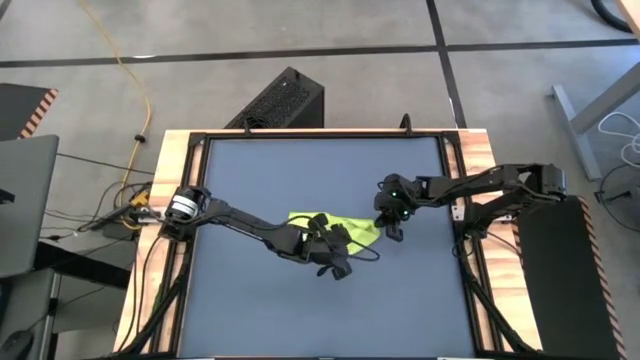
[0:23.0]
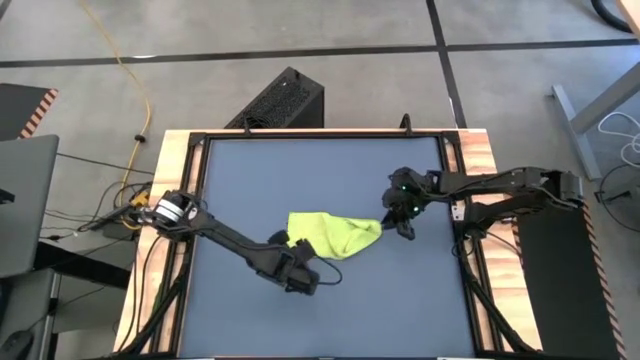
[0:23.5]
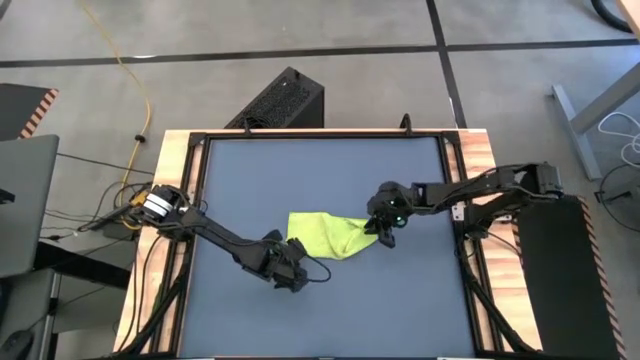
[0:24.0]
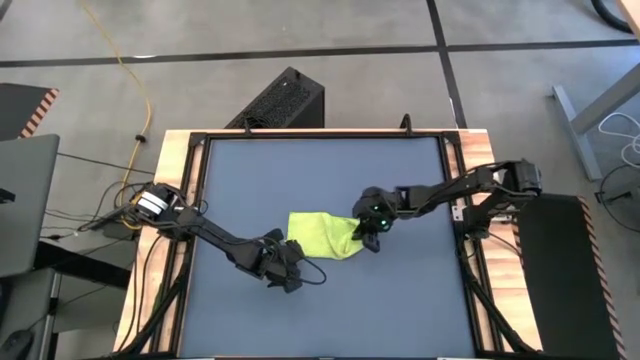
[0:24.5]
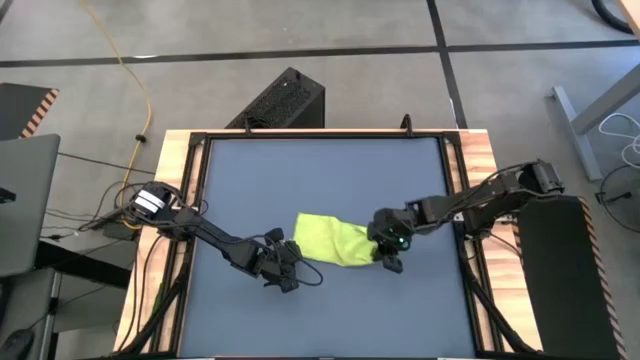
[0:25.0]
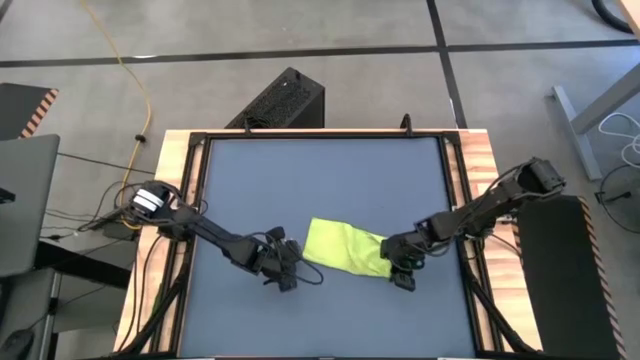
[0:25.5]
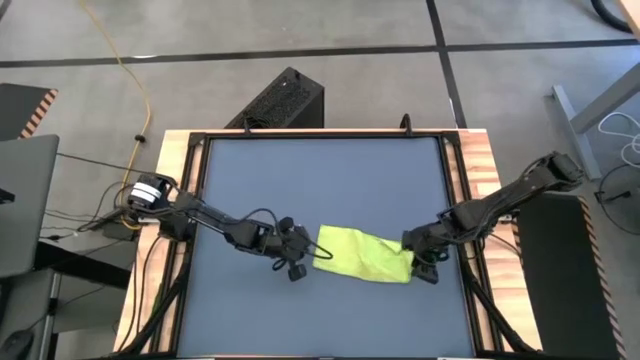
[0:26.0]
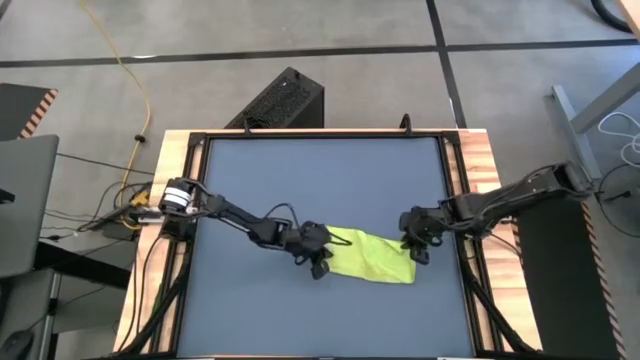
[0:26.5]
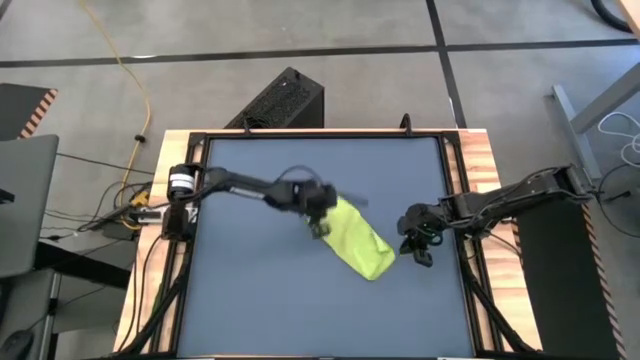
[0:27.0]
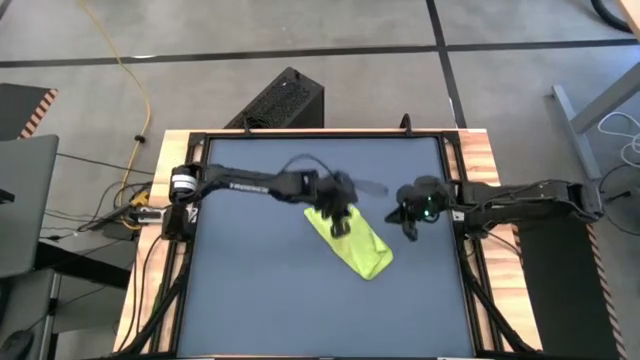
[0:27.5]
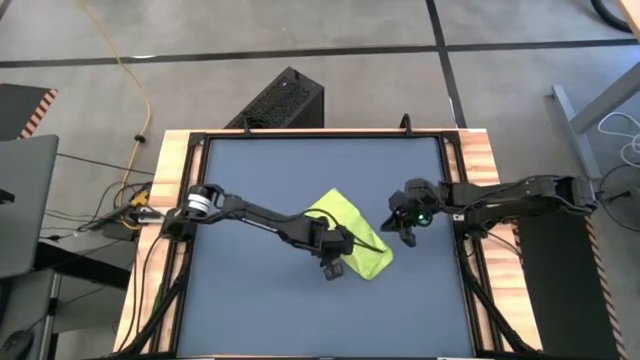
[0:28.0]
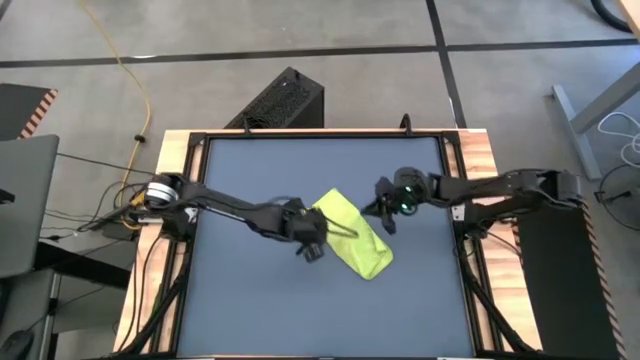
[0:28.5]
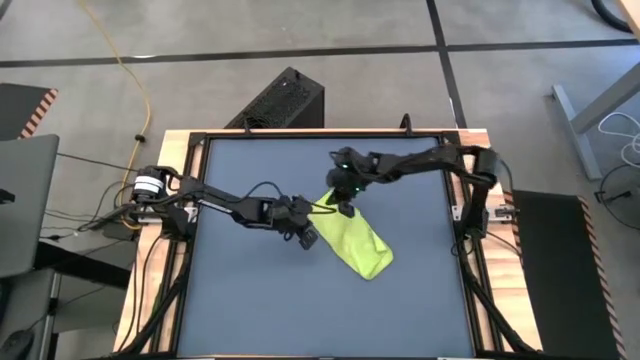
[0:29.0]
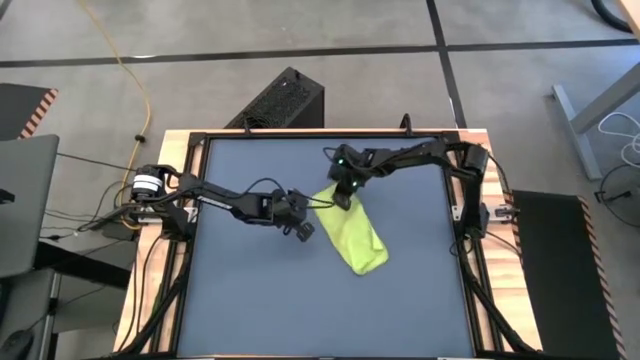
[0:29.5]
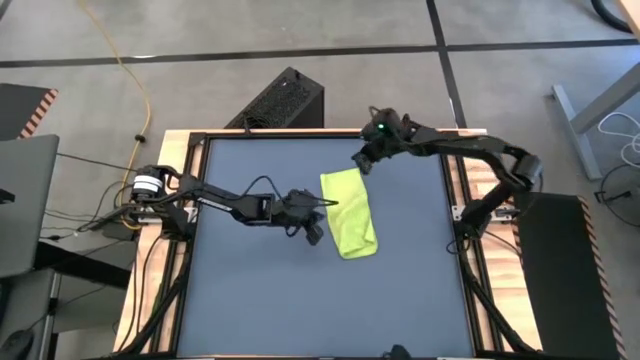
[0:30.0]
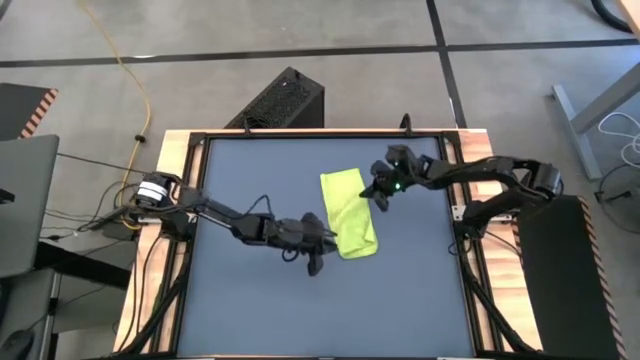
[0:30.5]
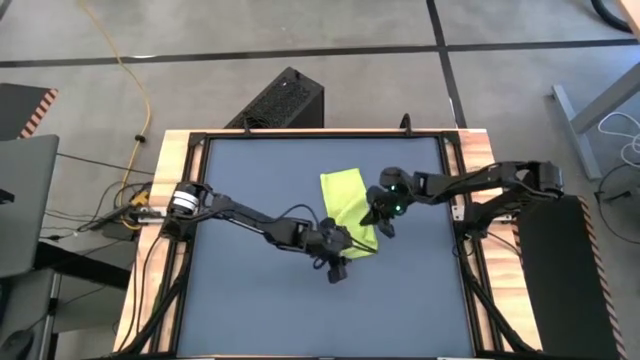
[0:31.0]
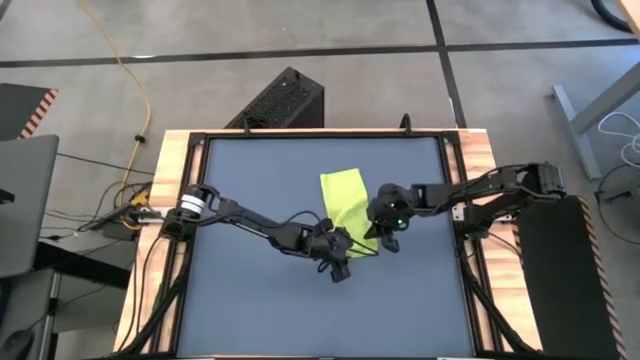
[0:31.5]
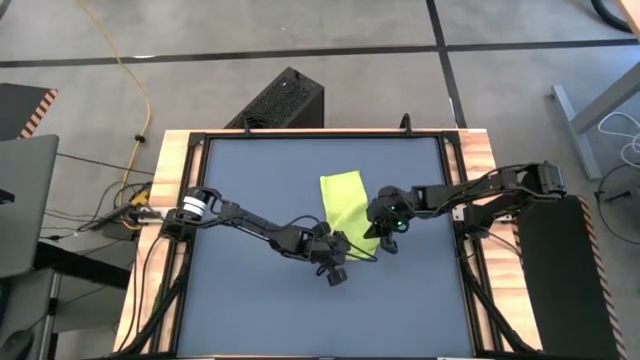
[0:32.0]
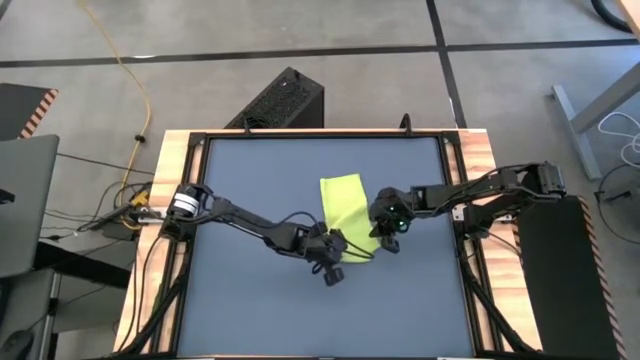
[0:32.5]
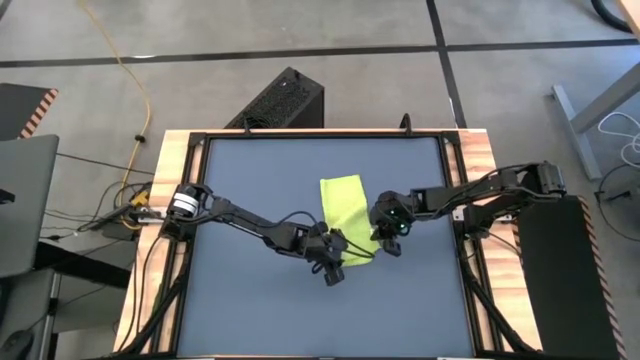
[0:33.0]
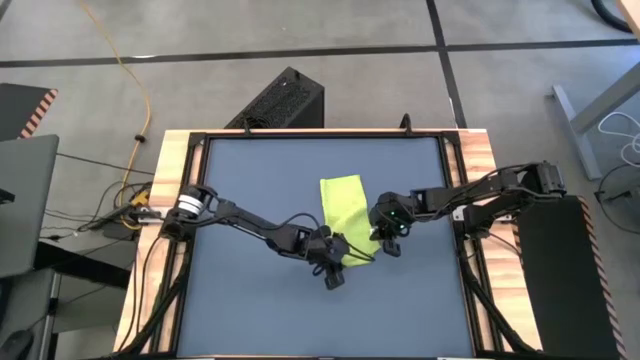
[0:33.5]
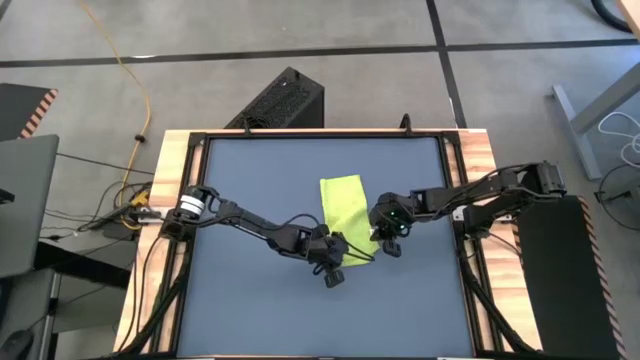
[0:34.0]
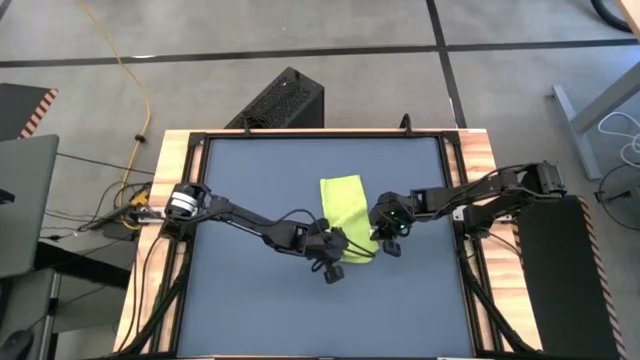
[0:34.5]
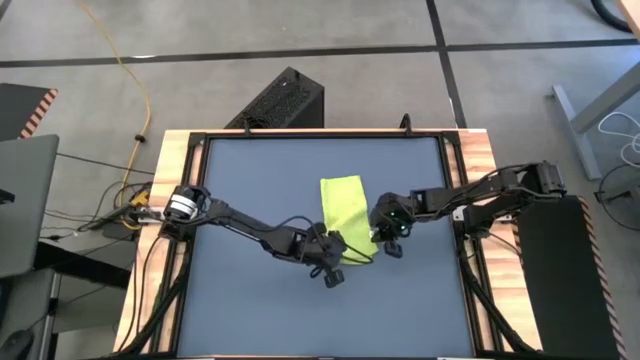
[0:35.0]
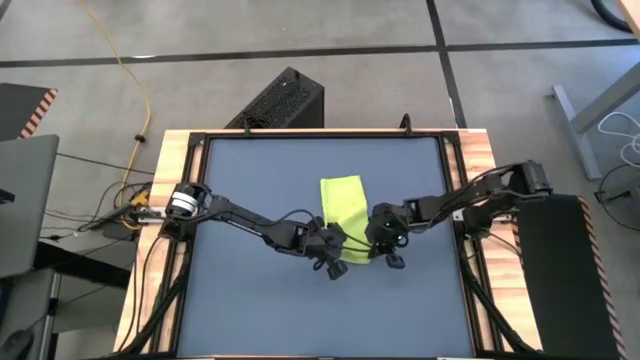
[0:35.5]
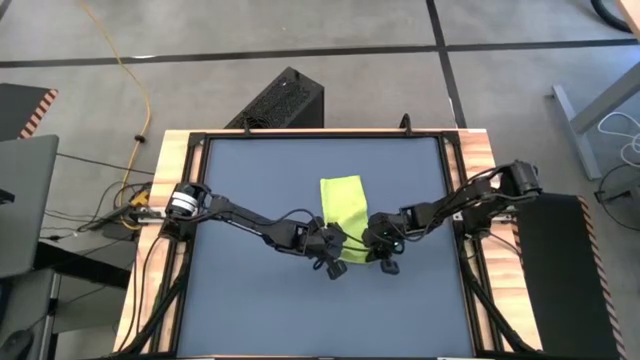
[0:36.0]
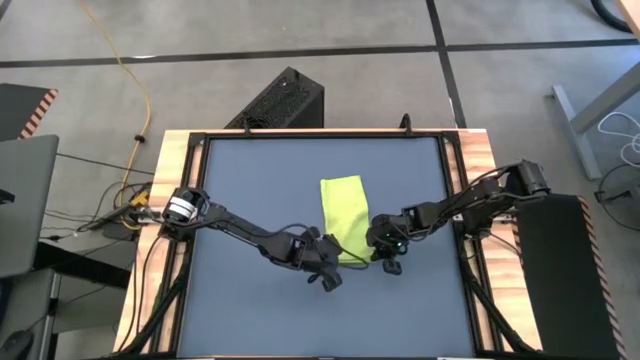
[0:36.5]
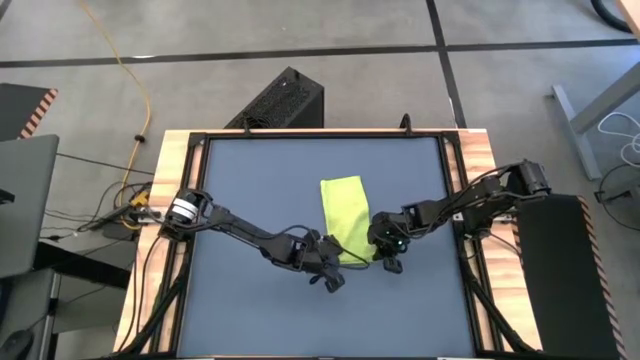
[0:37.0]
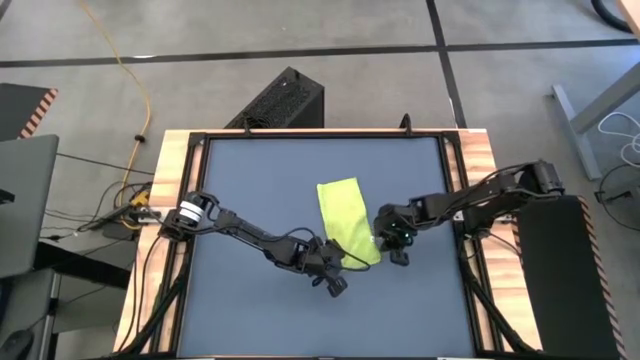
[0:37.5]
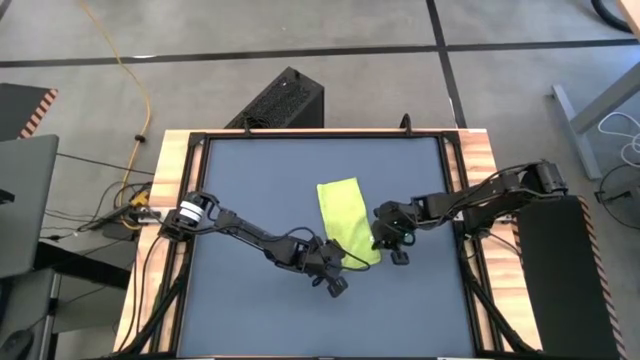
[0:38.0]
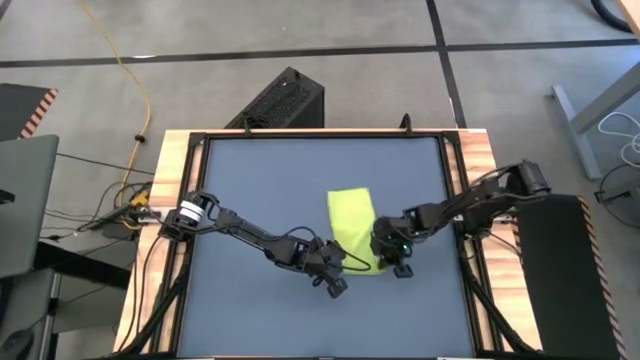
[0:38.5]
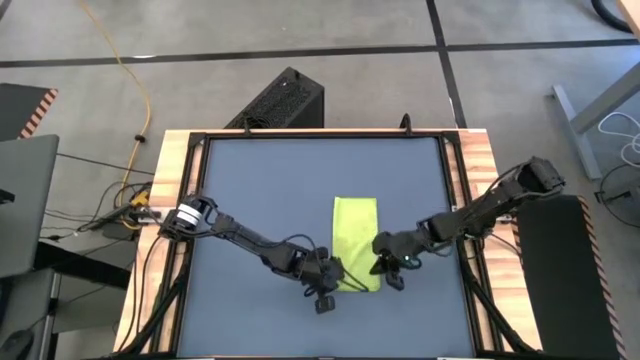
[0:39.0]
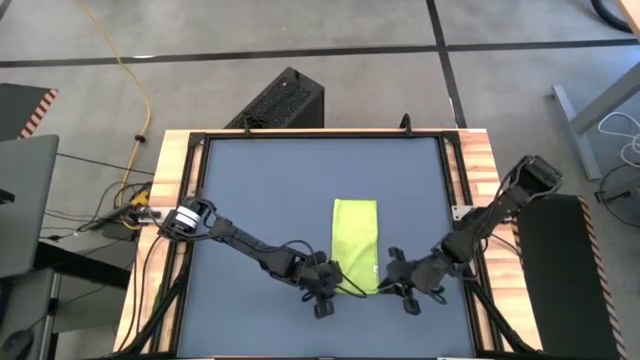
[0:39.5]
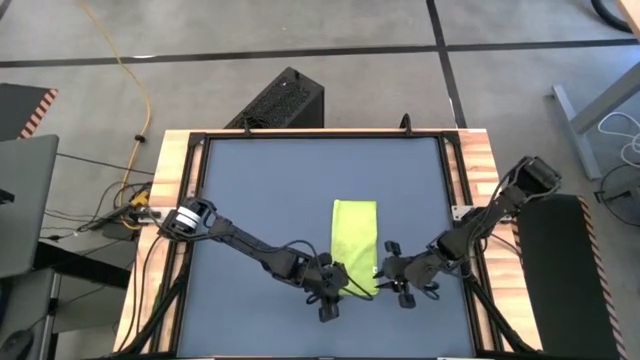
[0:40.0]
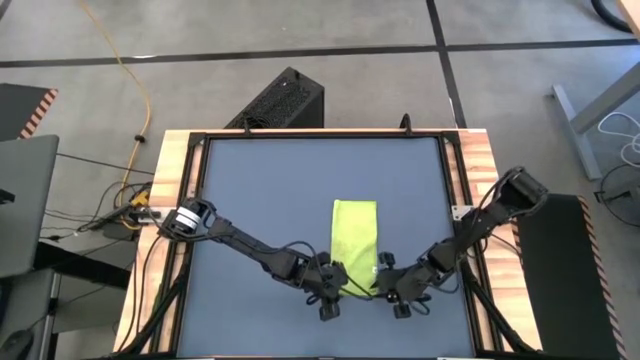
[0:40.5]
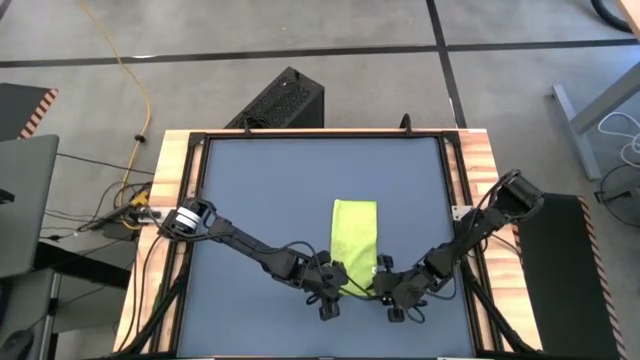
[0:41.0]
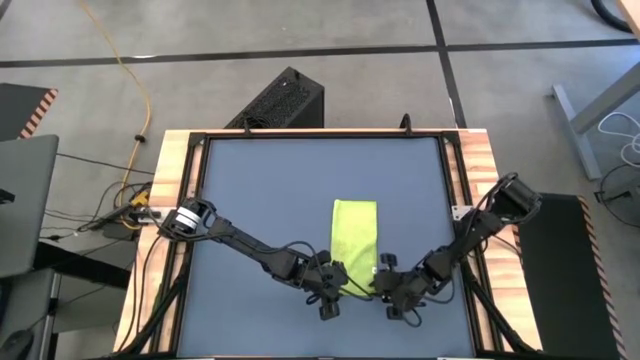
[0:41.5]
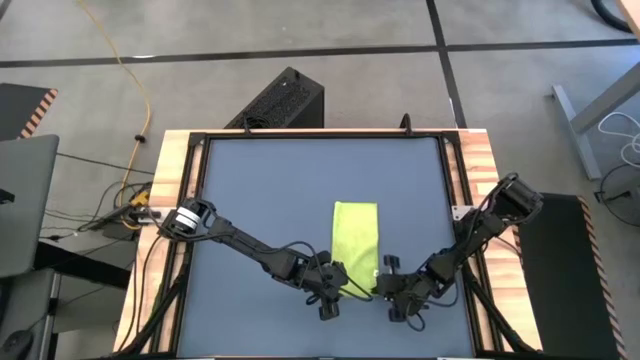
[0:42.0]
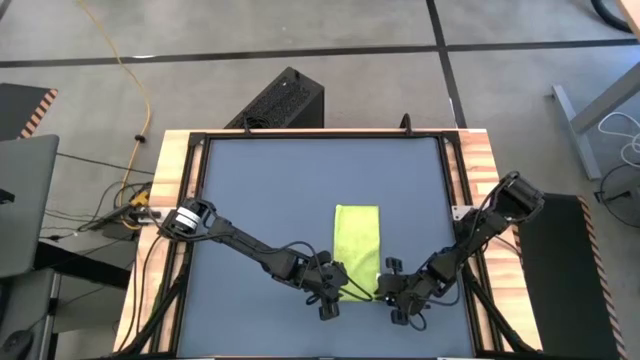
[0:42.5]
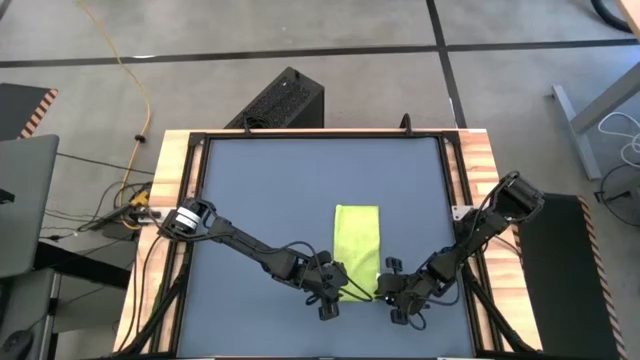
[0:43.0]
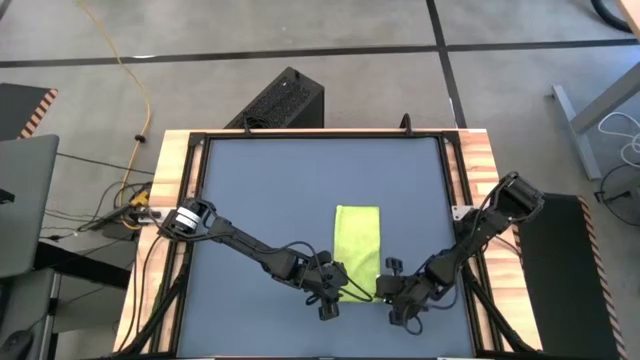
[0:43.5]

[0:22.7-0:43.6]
Task: Roll towel into tight, uniform cylinder
Roll the green towel
